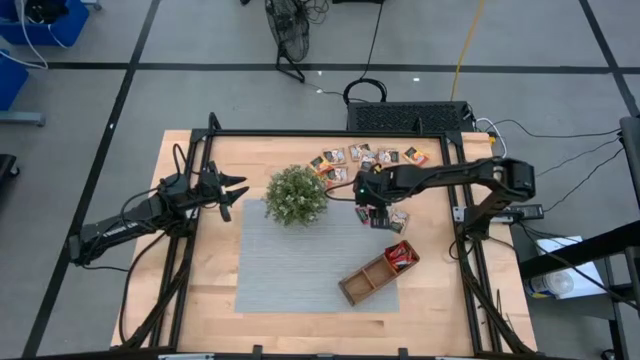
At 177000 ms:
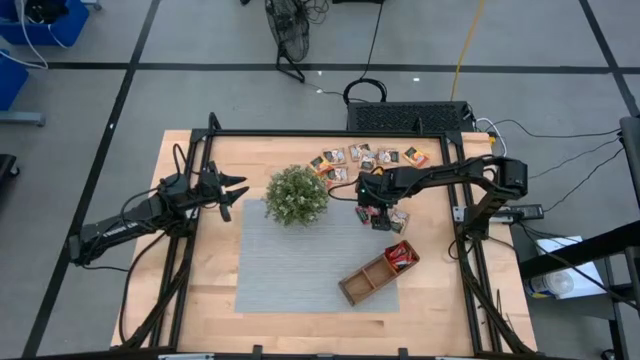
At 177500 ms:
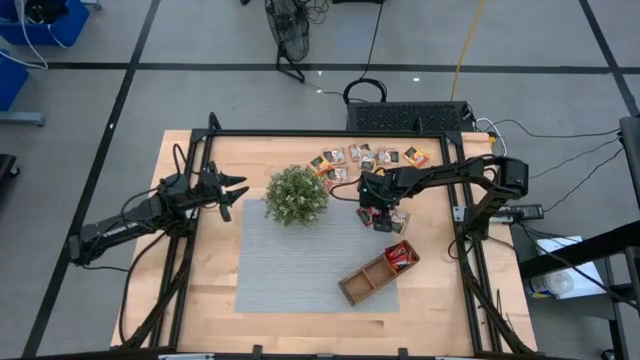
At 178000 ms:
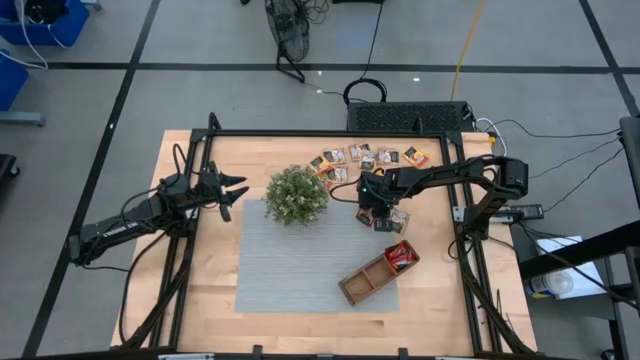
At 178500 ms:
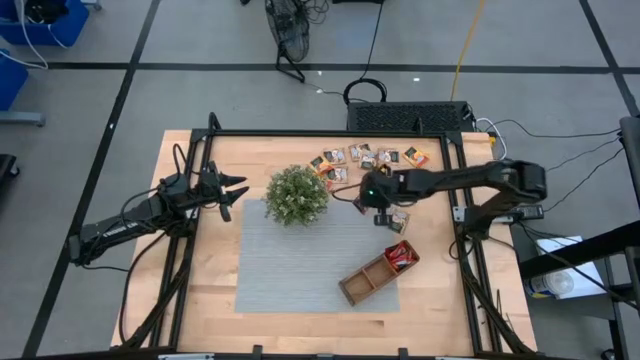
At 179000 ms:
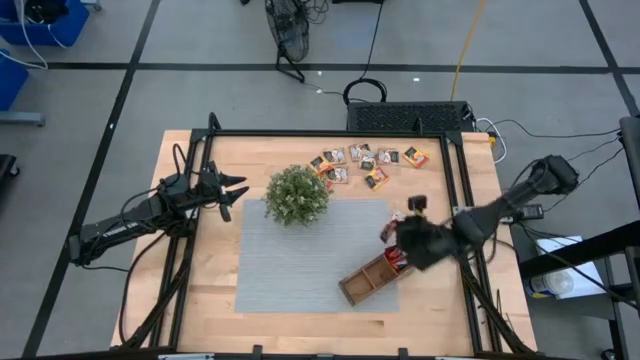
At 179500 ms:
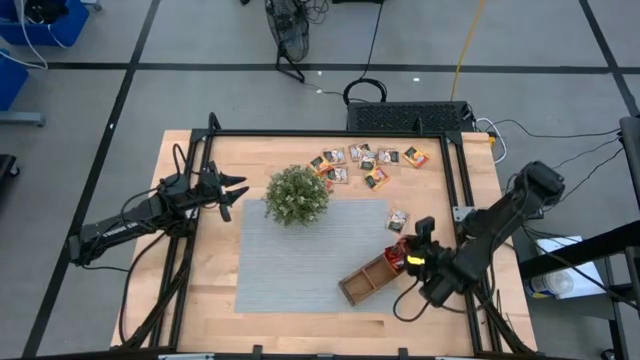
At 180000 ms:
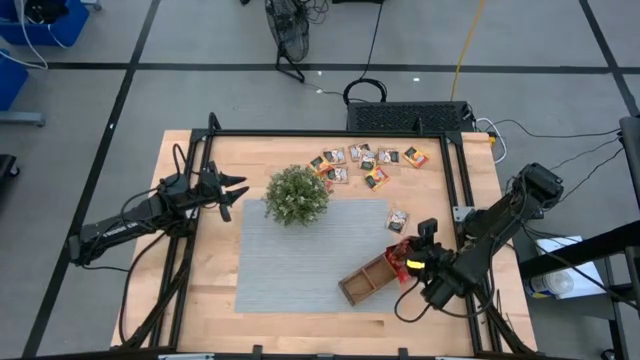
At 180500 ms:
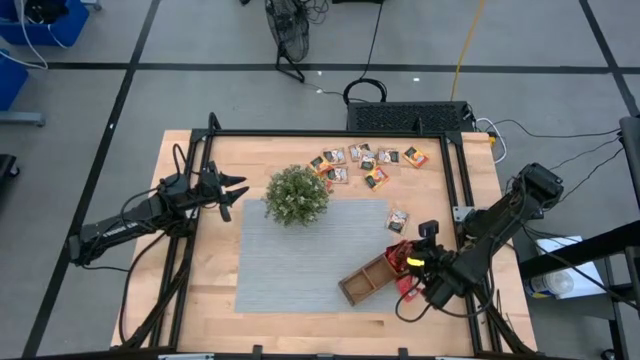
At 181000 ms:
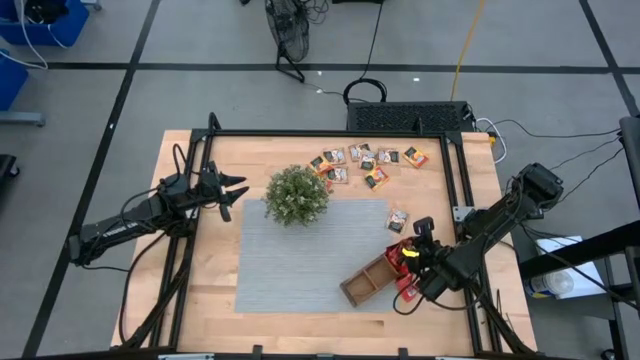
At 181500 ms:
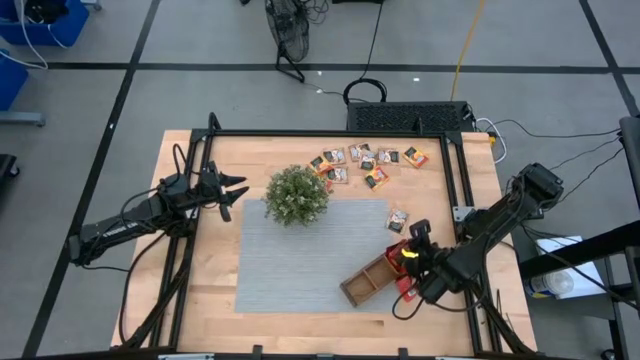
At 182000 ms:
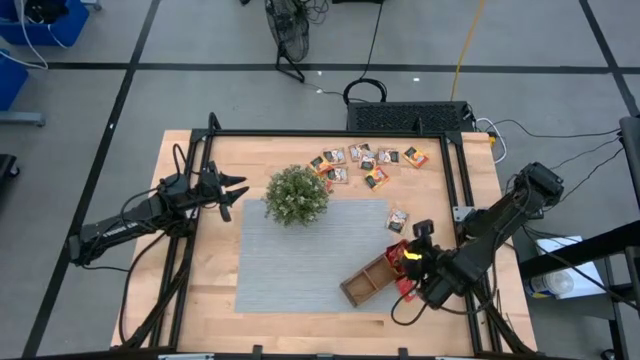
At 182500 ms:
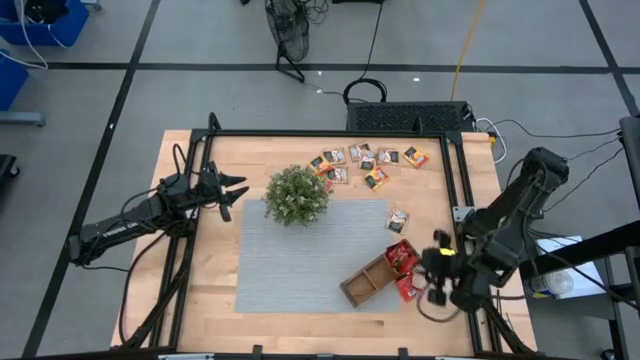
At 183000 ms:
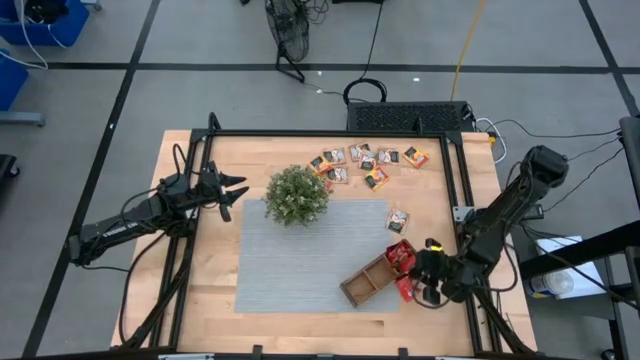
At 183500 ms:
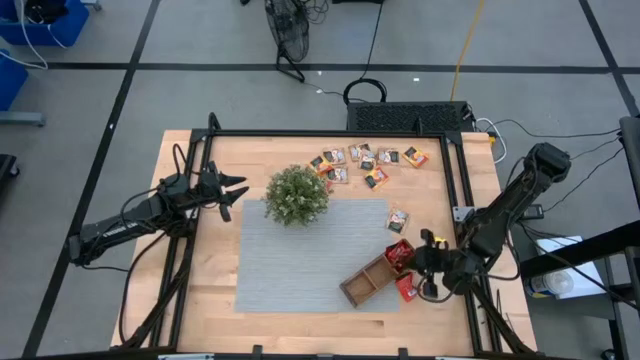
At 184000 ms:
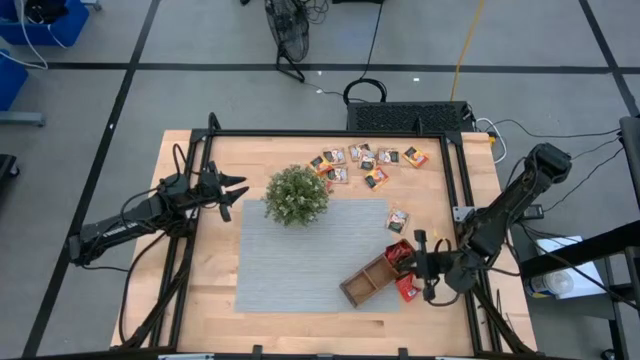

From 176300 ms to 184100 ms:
Task: Pick & Place Tea
Put the strawberry tea sachet into the brown organizer

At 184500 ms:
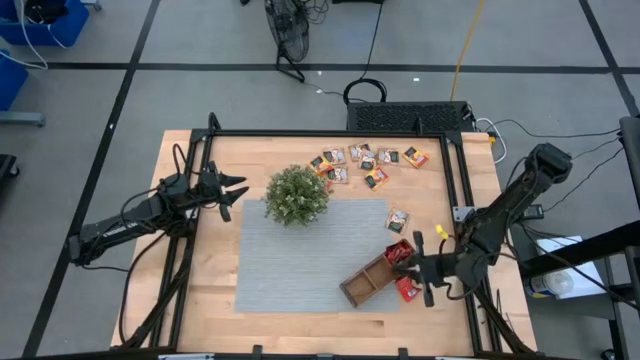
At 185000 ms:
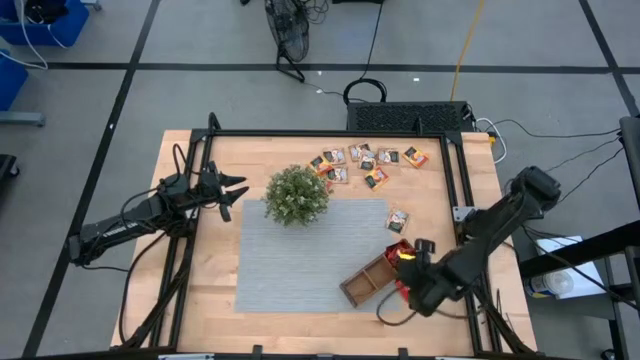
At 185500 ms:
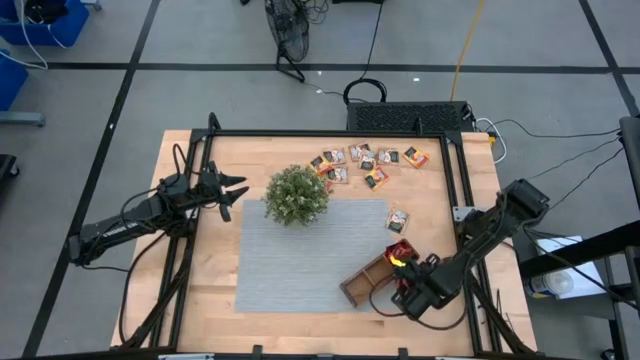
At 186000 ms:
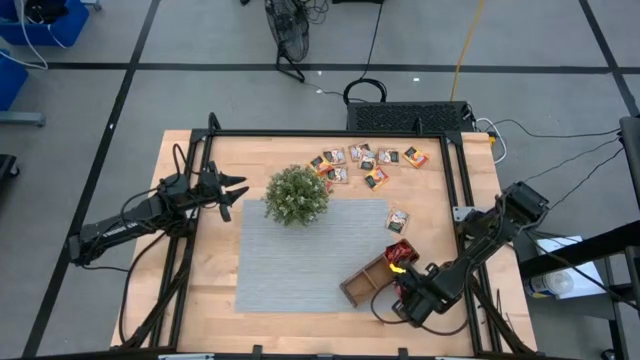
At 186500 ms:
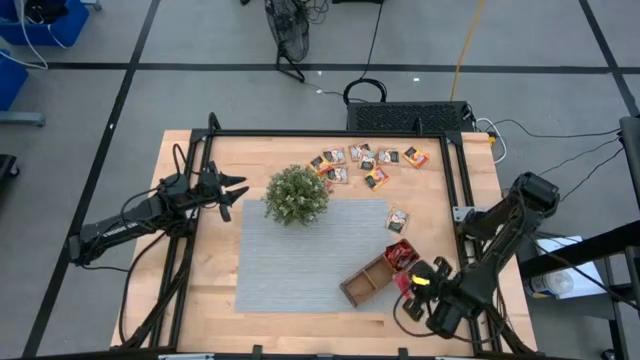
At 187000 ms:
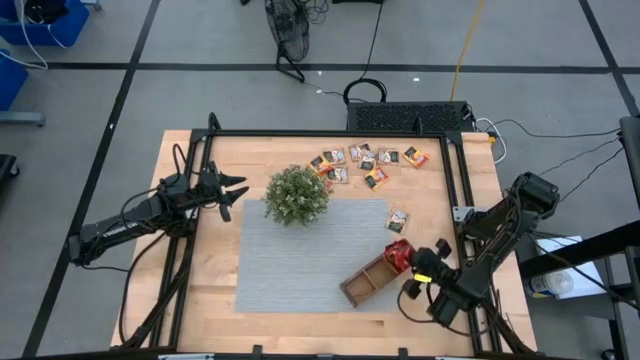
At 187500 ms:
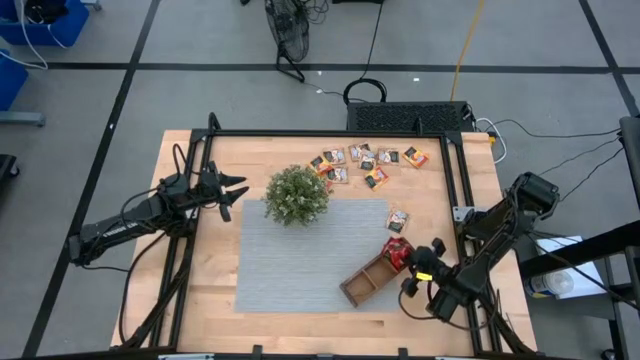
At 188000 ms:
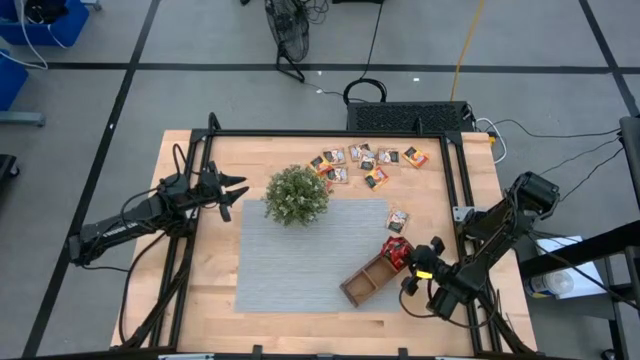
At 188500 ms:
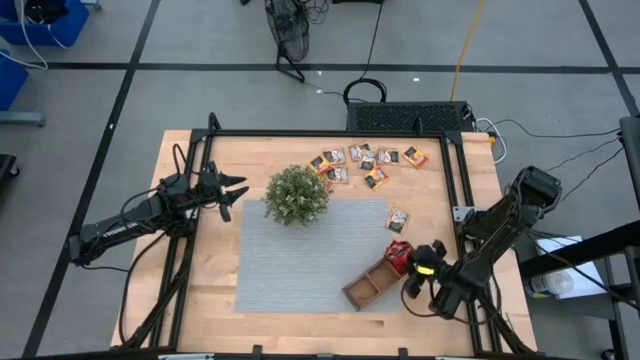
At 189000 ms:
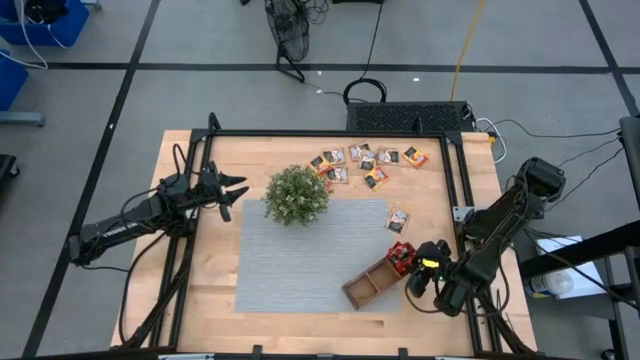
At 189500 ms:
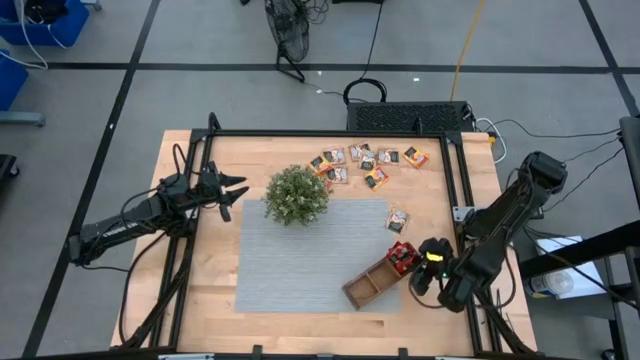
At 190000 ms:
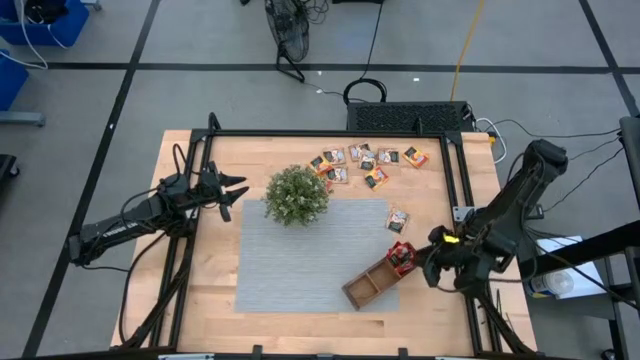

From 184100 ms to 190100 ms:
Put the strawberry tea sachet into the brown organizer

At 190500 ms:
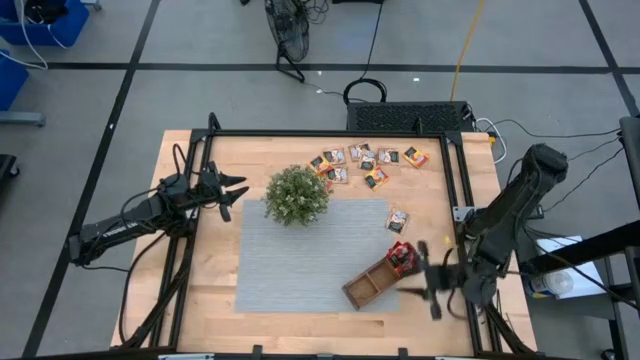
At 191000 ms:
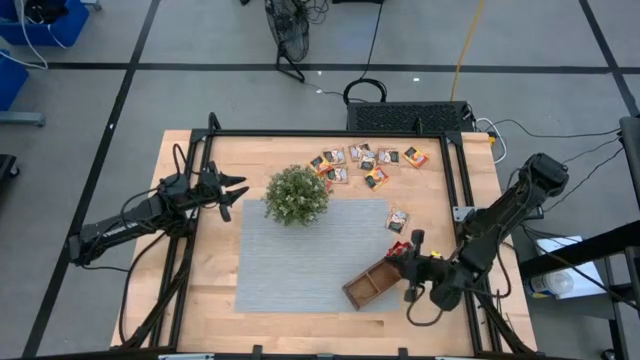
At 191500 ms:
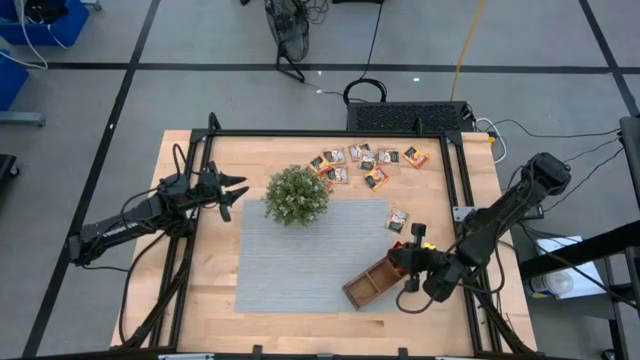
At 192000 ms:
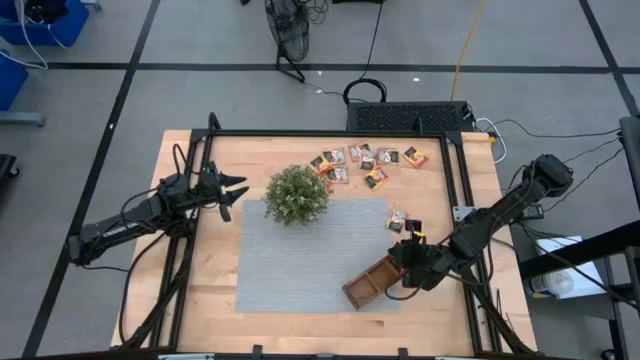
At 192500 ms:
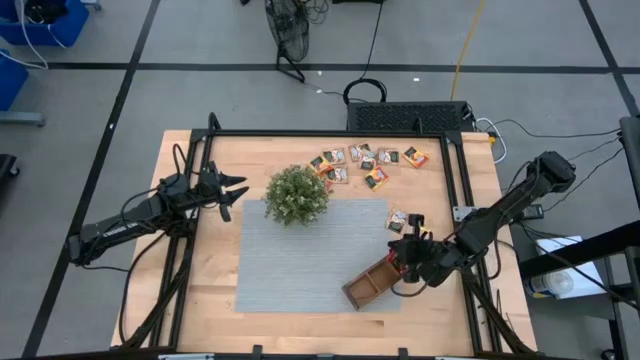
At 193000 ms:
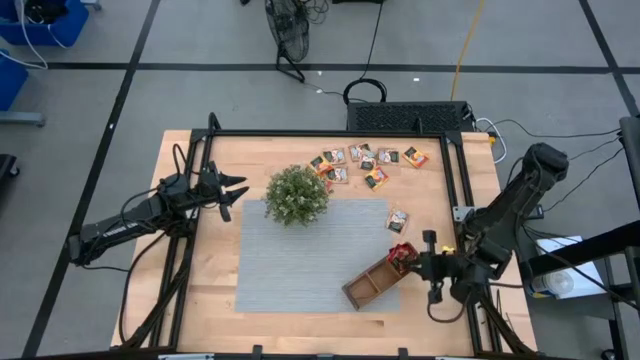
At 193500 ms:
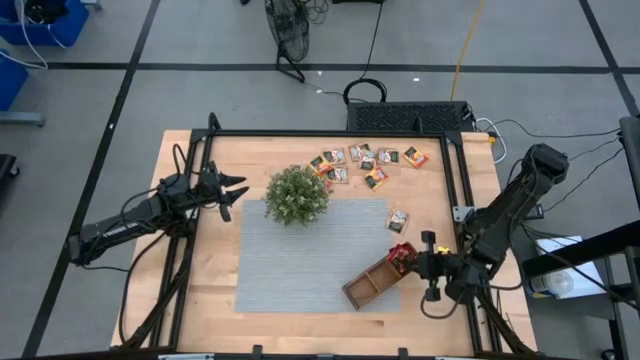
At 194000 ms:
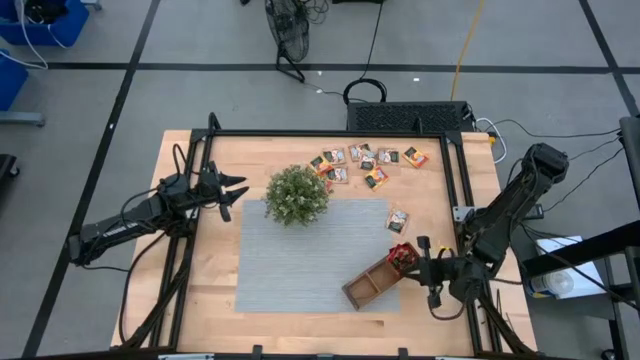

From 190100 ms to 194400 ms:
Adjust the strawberry tea sachets

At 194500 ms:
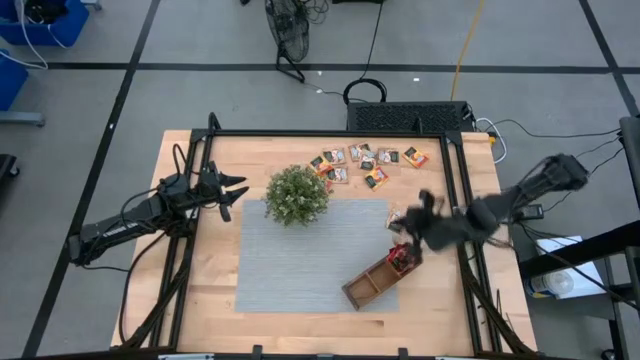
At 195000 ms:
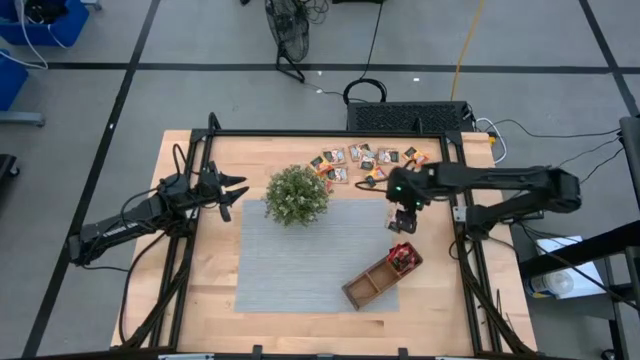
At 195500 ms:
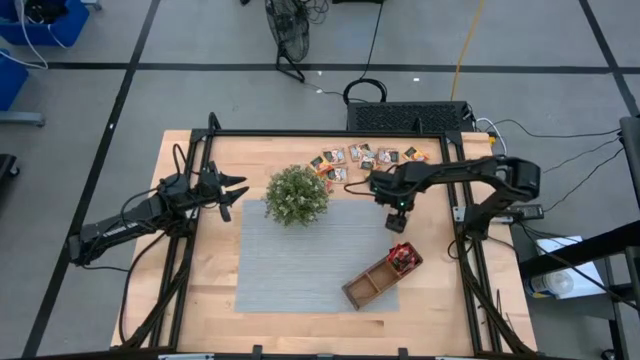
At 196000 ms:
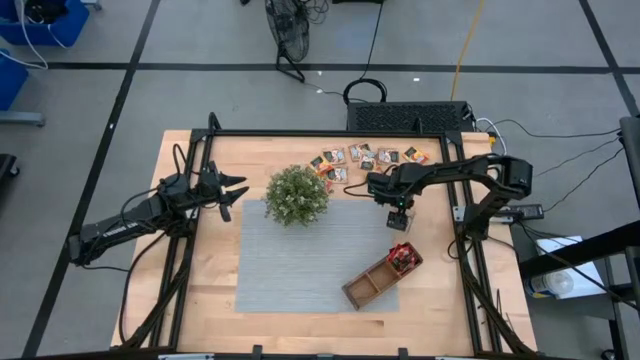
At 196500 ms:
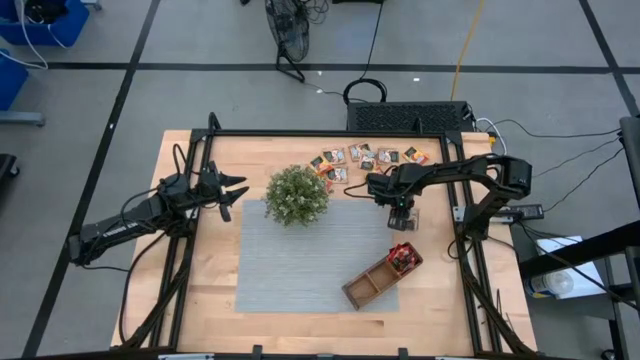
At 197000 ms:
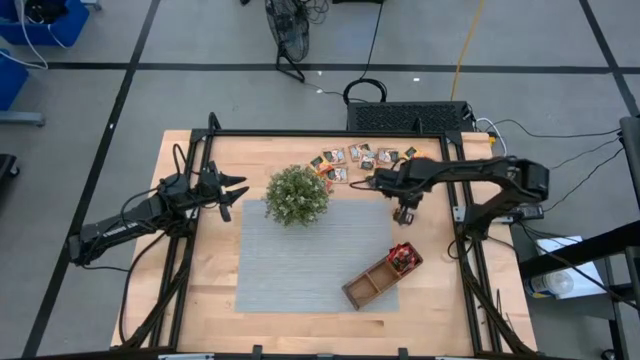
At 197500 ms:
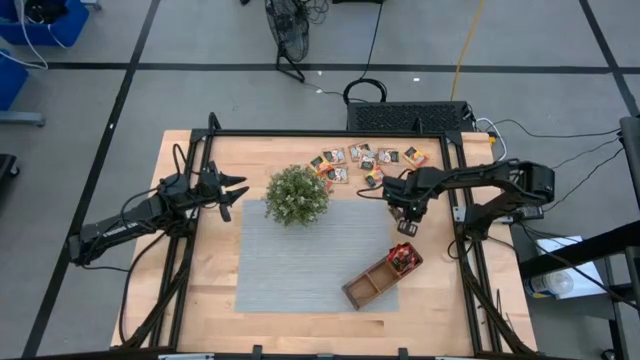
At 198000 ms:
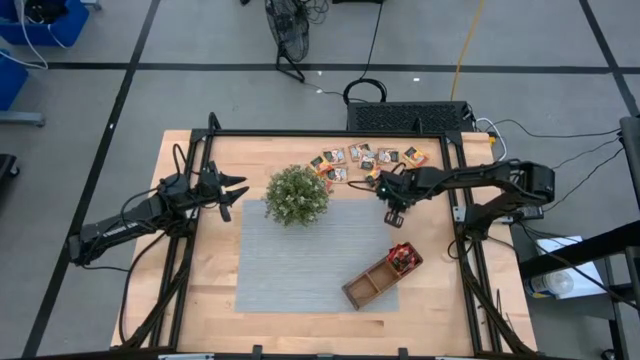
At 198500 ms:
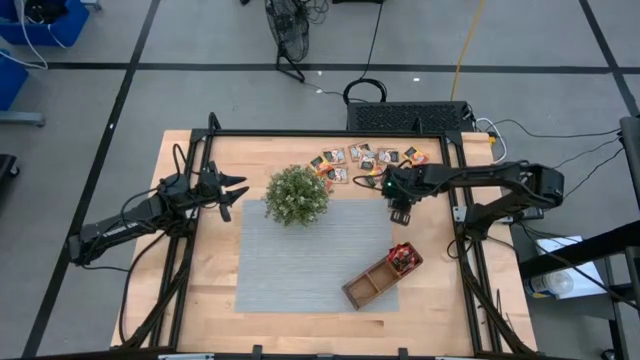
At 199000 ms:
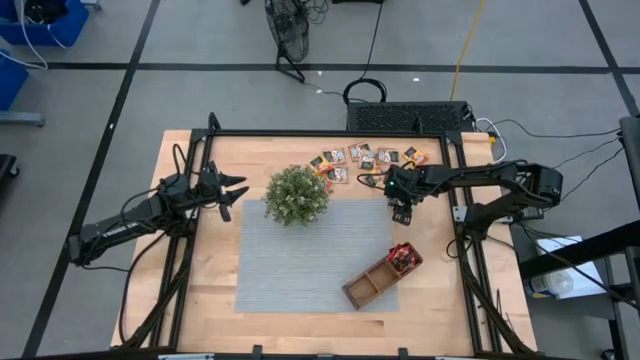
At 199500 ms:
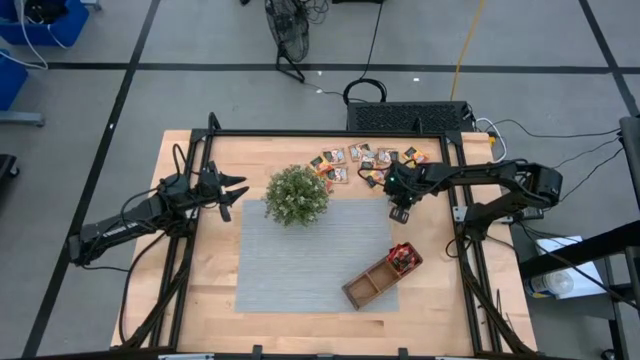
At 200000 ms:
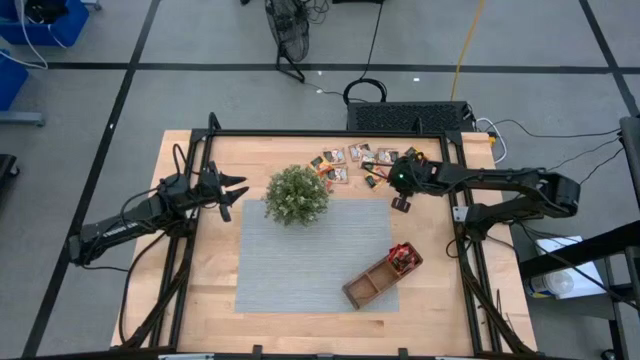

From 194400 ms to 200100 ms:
Put the apple tea sachet into the brown organizer
